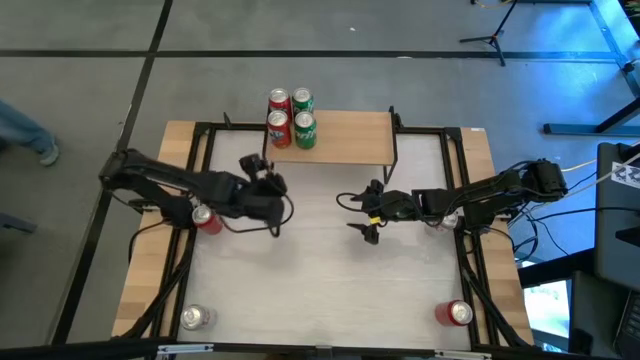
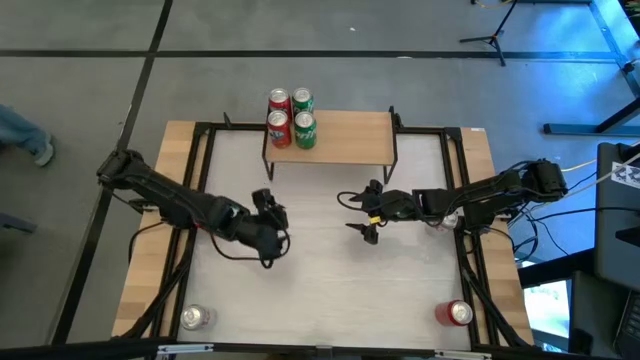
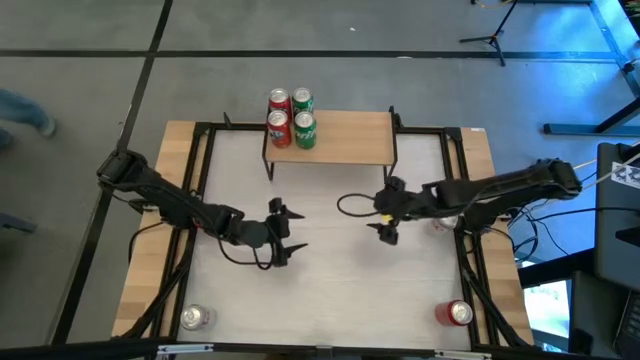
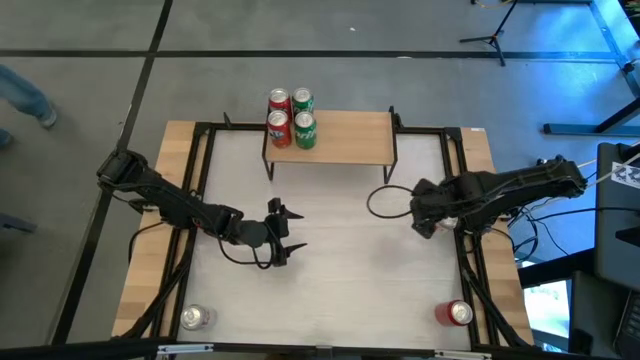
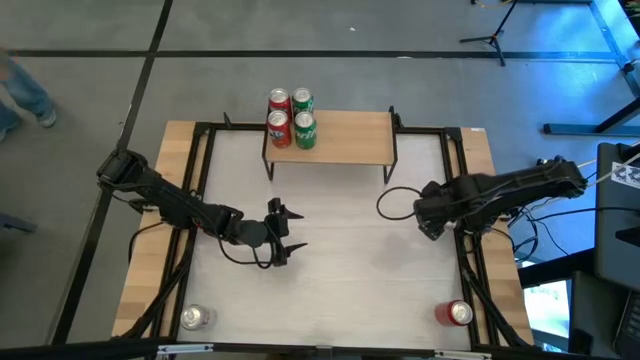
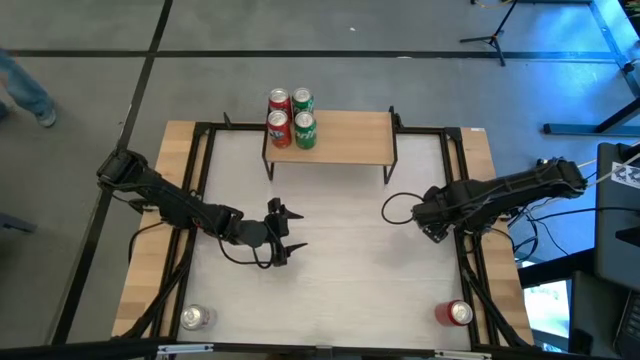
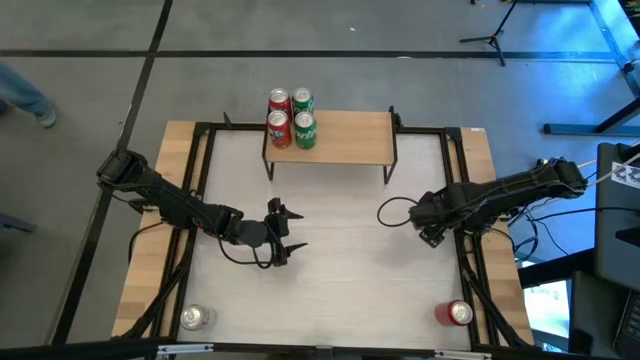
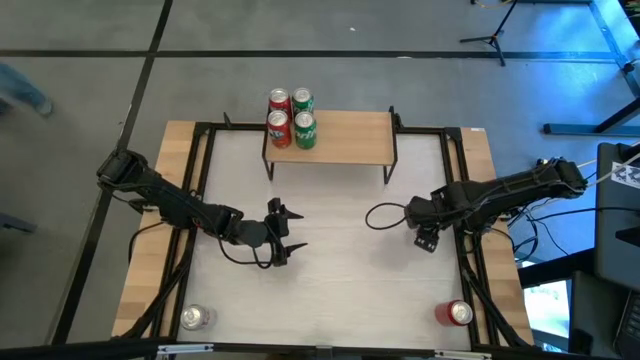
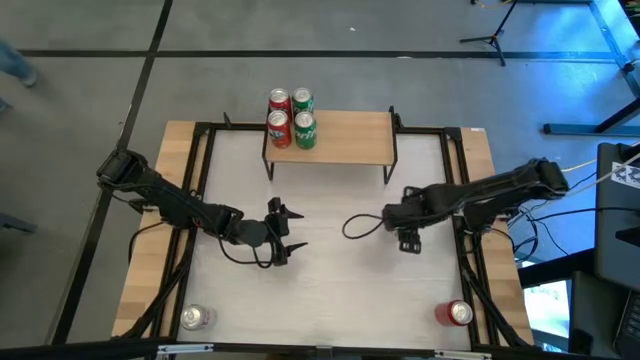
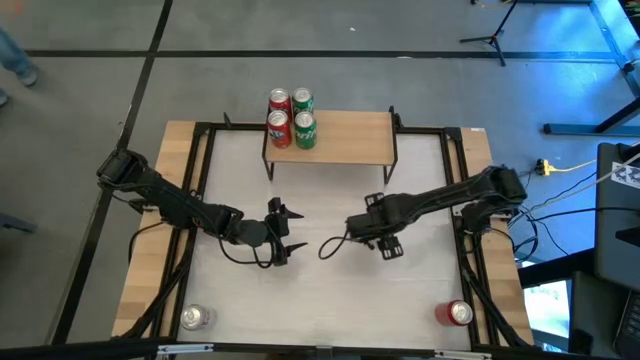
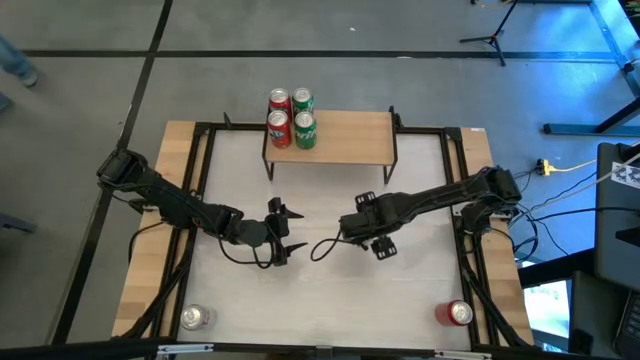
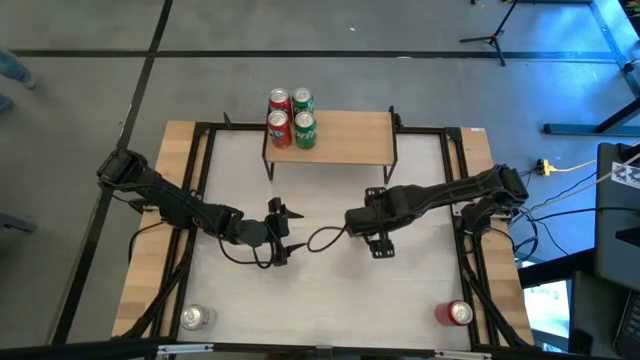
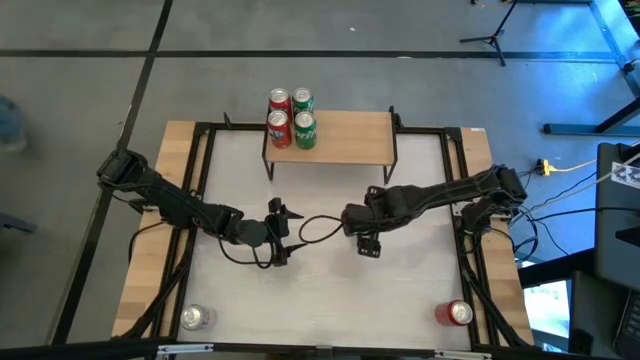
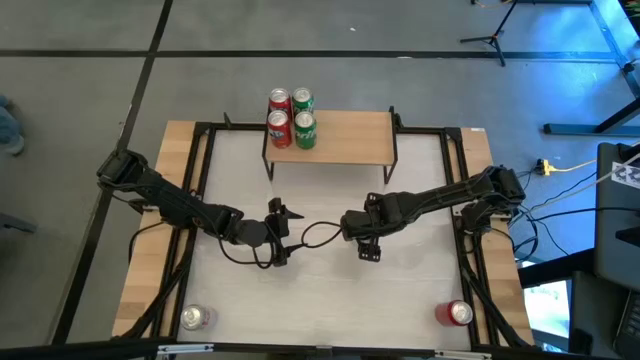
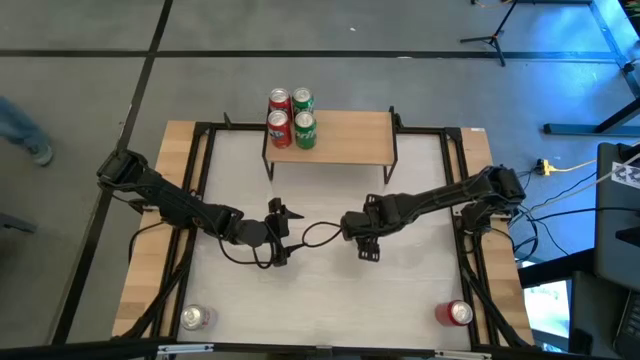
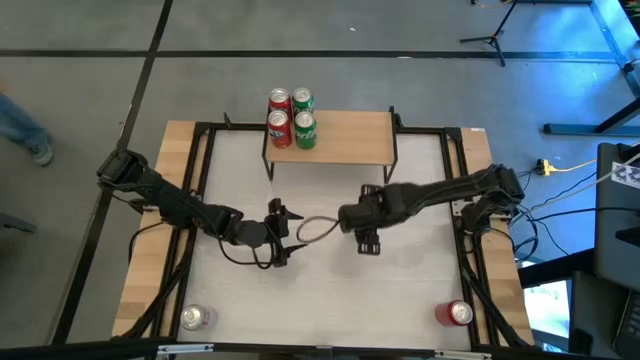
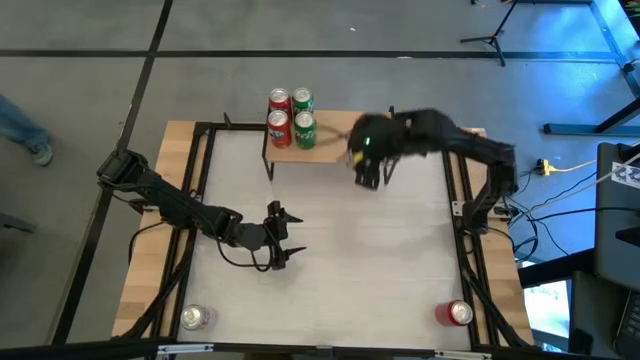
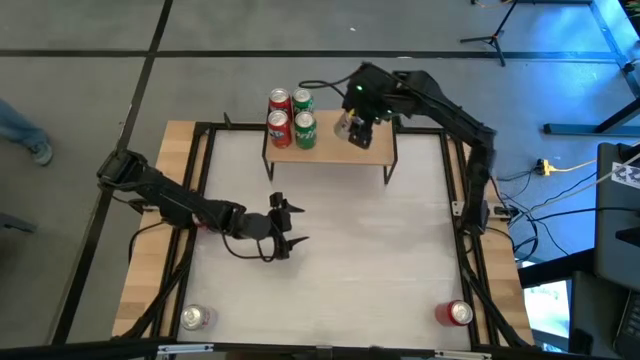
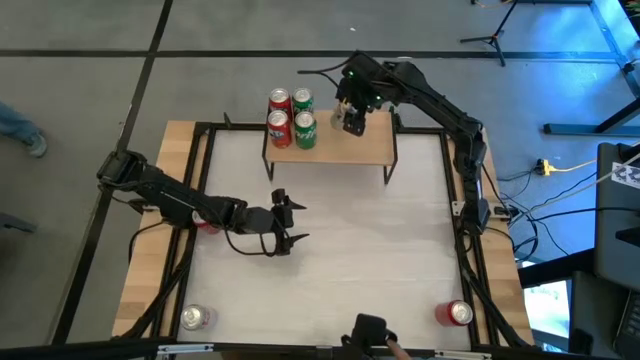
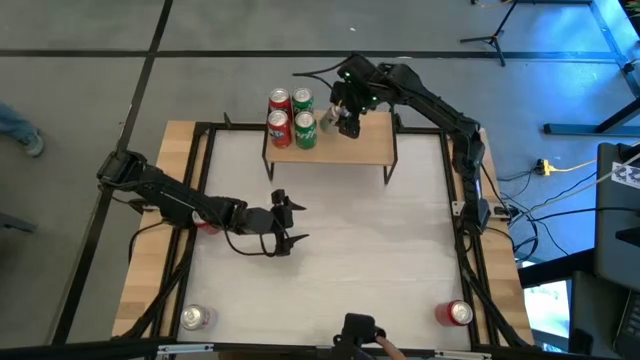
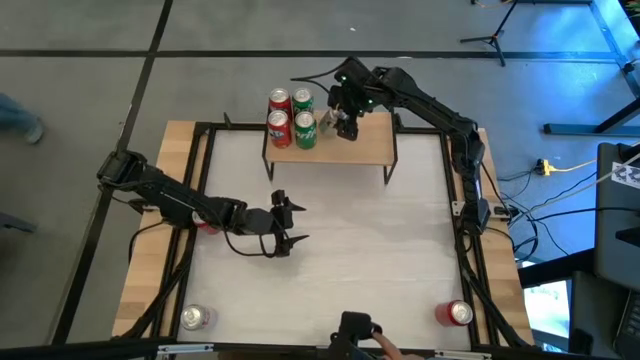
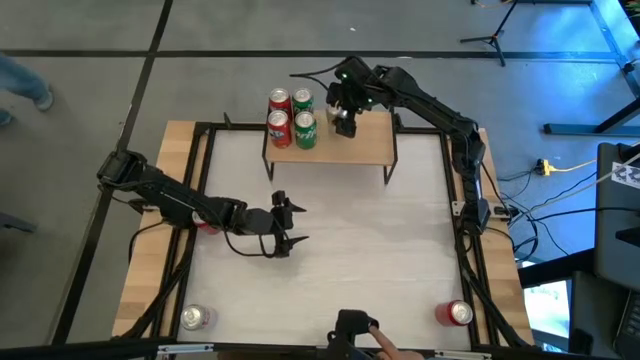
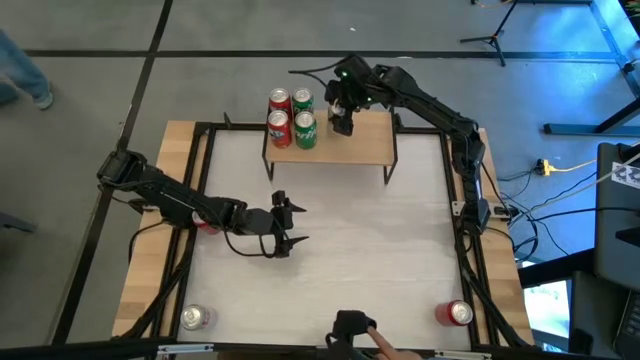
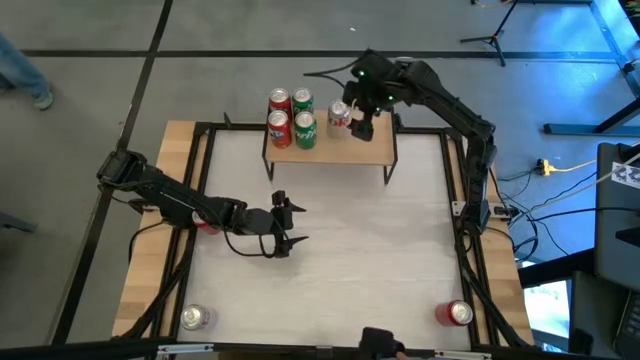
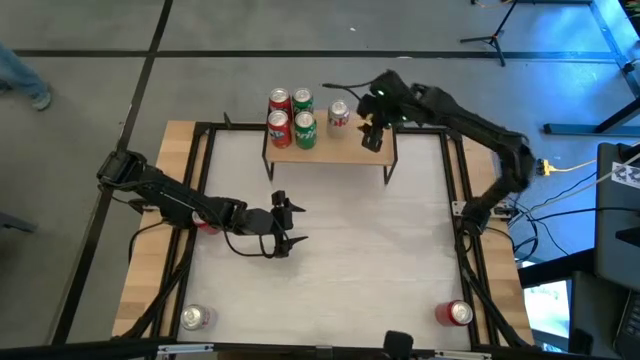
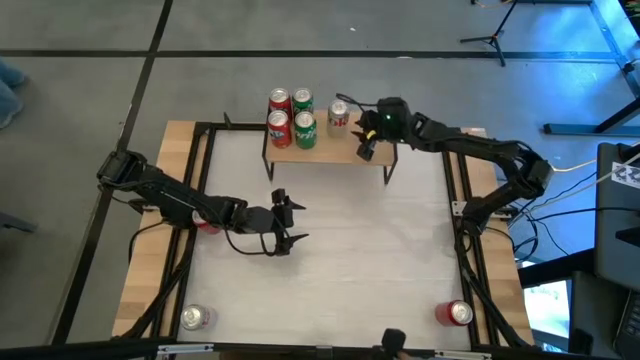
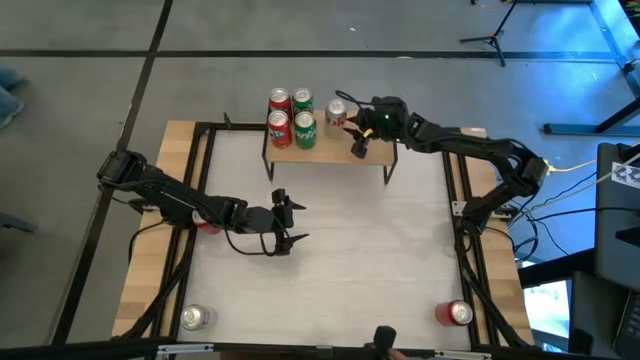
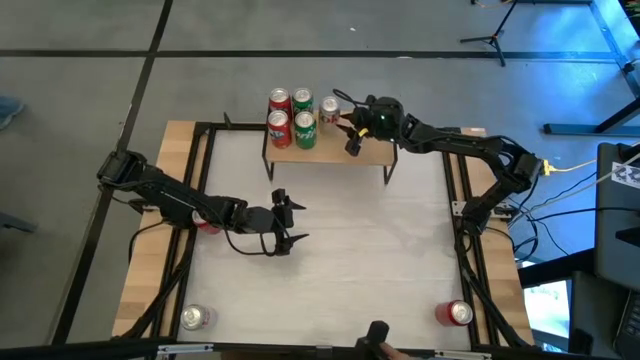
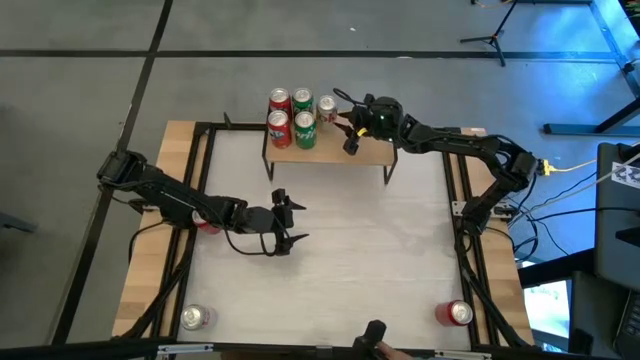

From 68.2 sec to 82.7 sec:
Task: Place canned beverage on shelf
Put the top silver soda can on the shelf

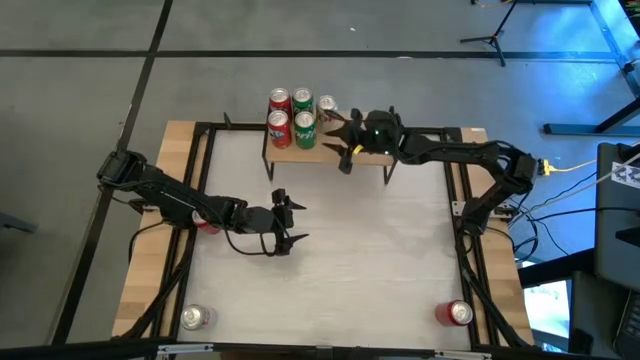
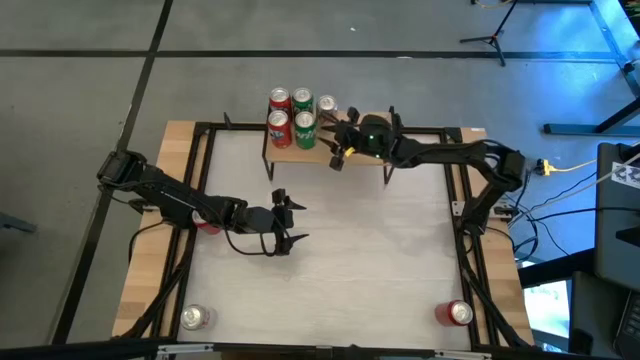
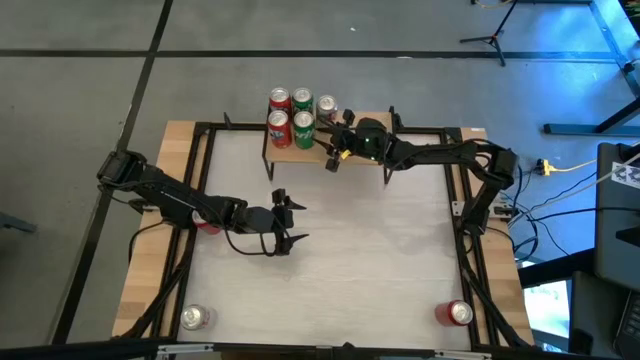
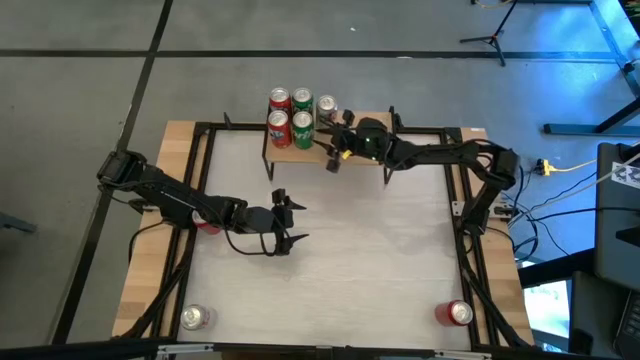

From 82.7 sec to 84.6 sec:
Adjust the green soda can on the shelf

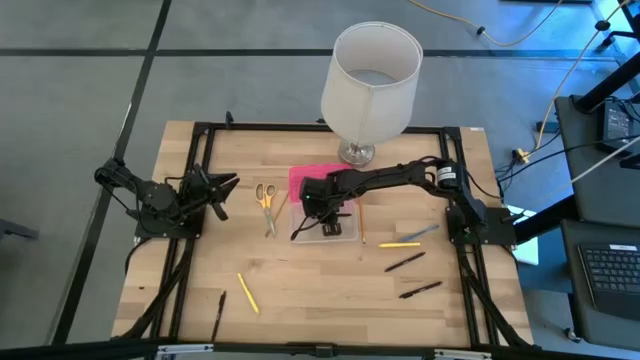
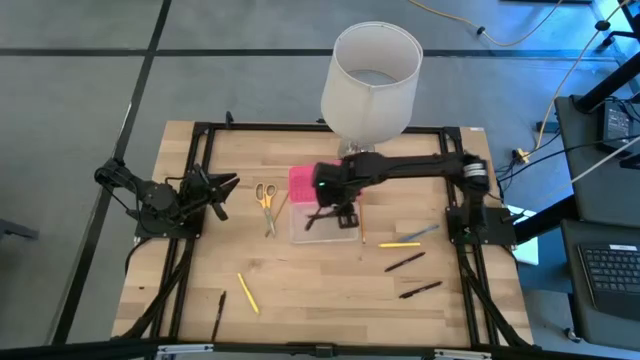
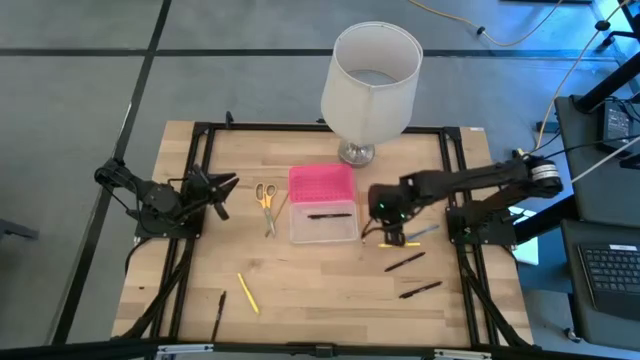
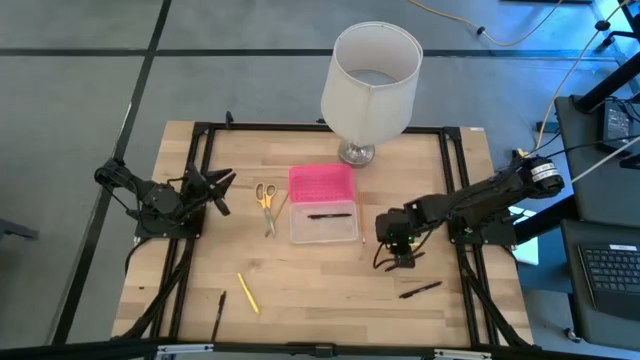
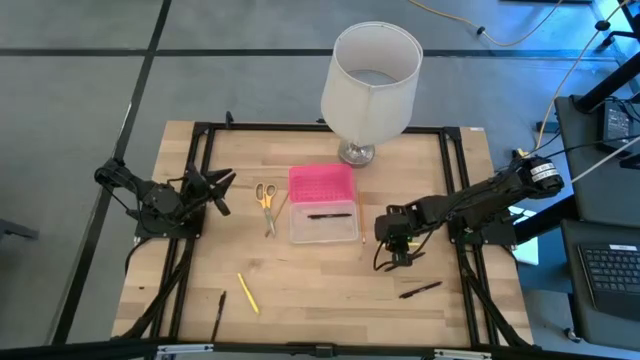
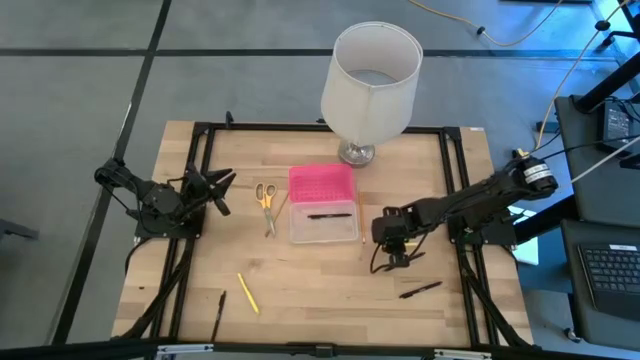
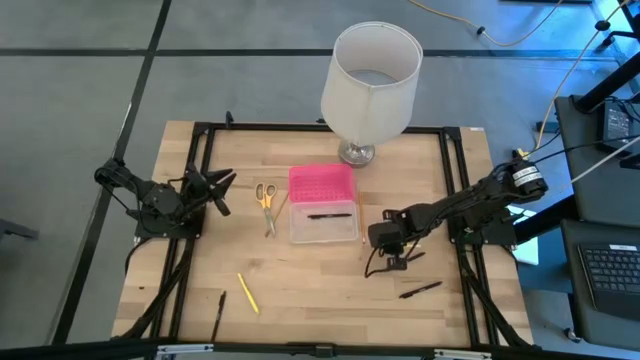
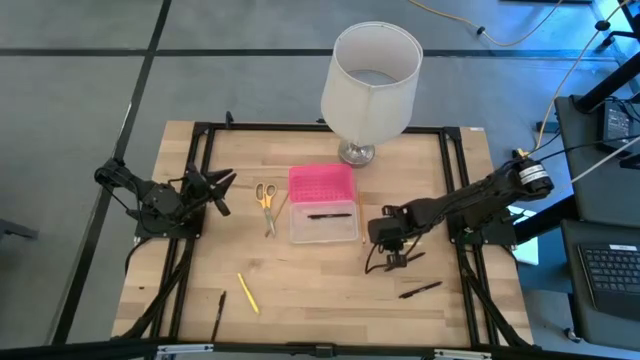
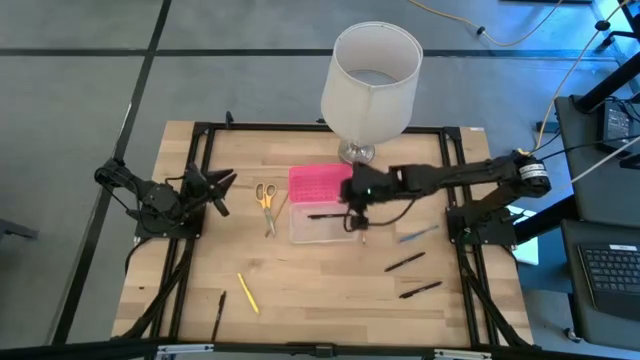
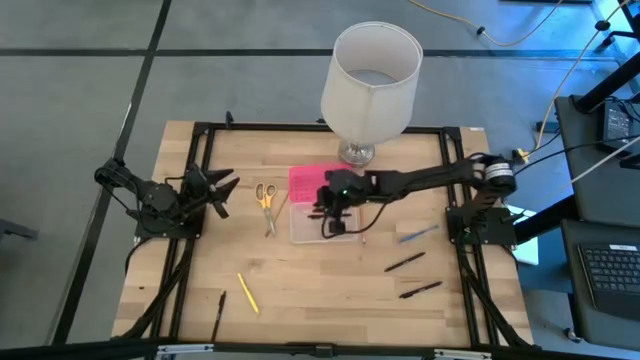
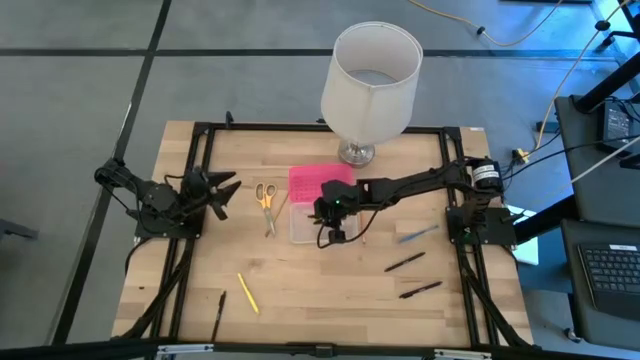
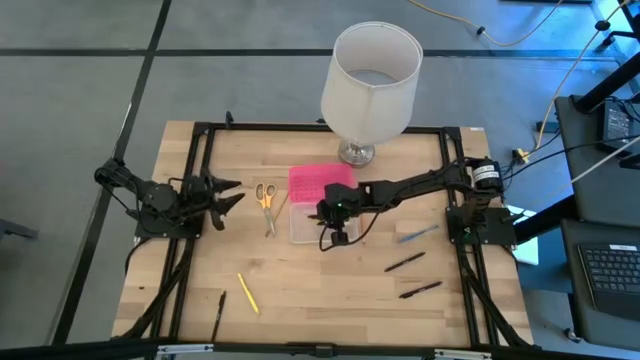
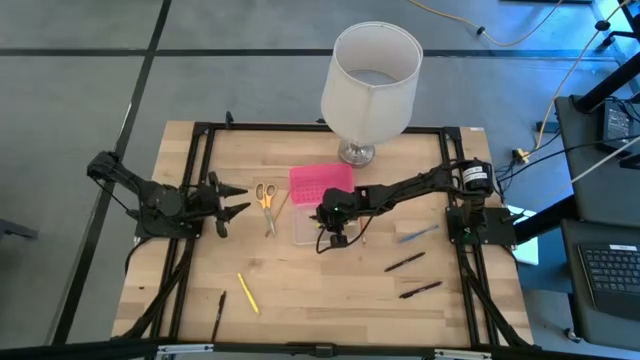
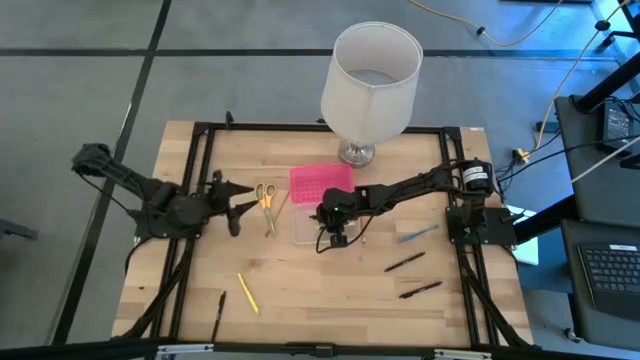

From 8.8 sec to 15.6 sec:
Task: Pick & place school supplies into a supply box
Put the right yellow pen into the supply box
